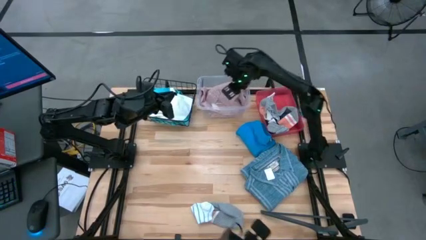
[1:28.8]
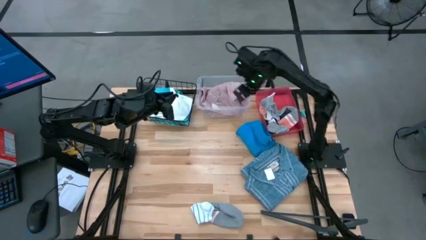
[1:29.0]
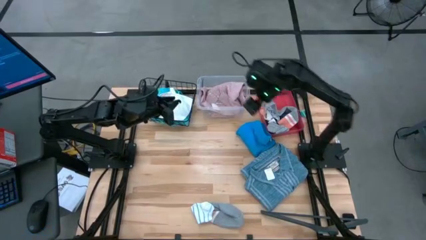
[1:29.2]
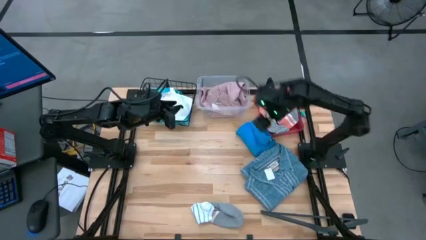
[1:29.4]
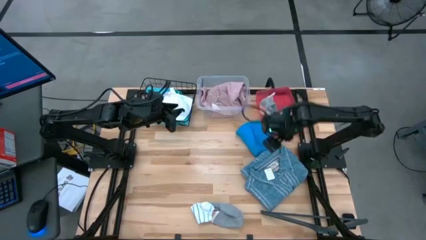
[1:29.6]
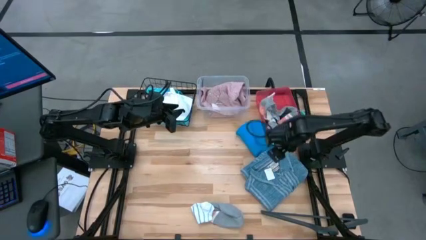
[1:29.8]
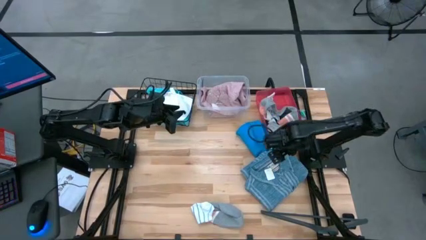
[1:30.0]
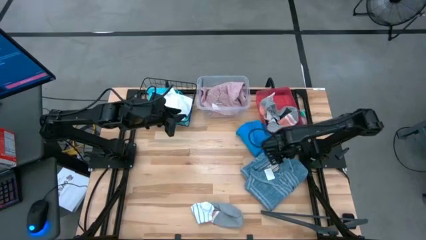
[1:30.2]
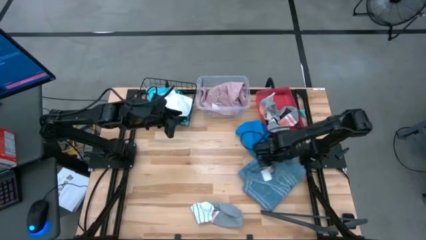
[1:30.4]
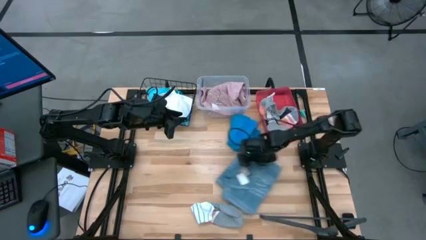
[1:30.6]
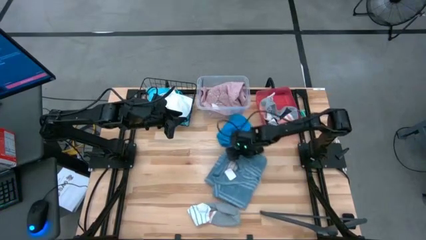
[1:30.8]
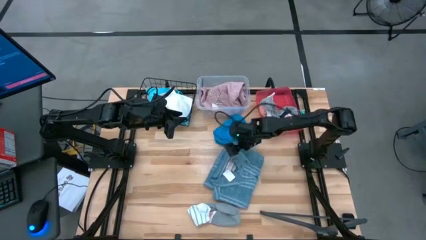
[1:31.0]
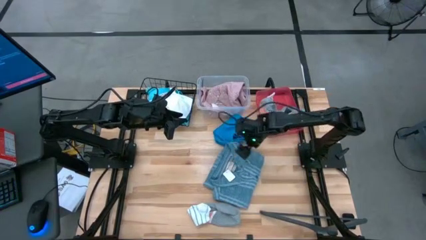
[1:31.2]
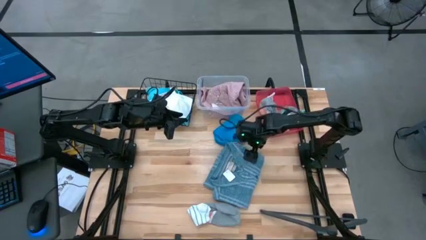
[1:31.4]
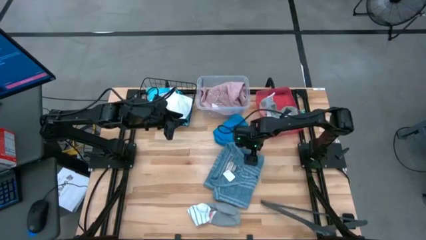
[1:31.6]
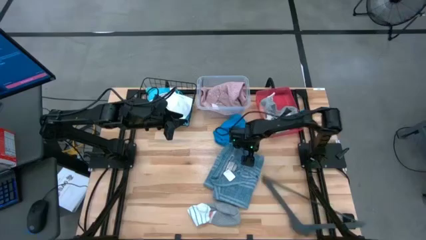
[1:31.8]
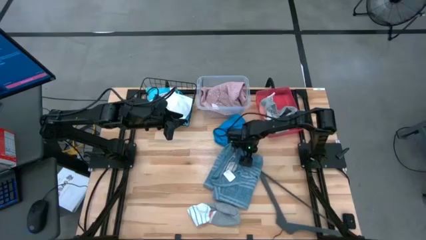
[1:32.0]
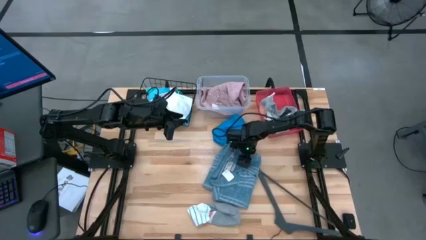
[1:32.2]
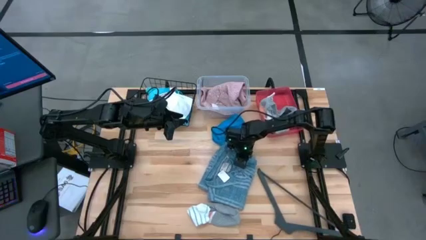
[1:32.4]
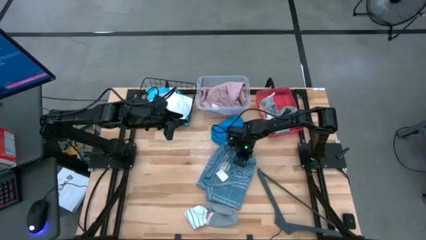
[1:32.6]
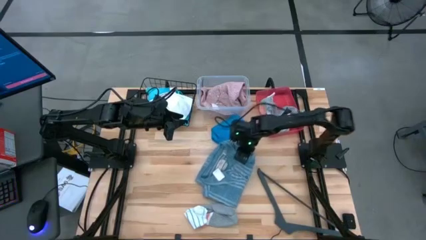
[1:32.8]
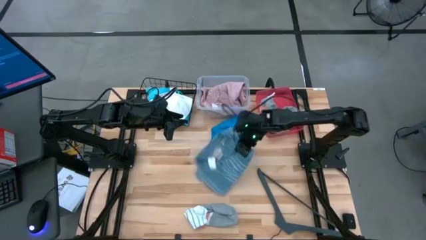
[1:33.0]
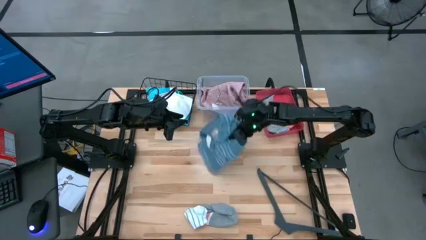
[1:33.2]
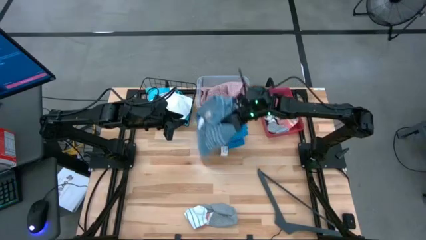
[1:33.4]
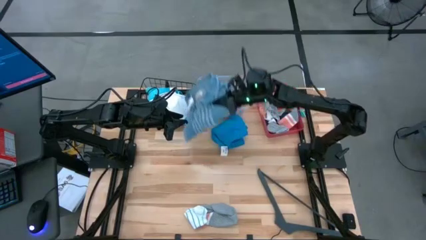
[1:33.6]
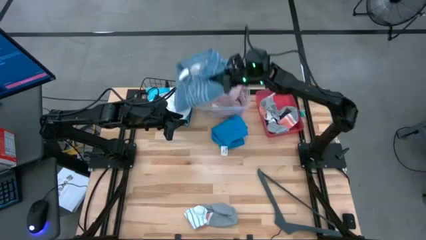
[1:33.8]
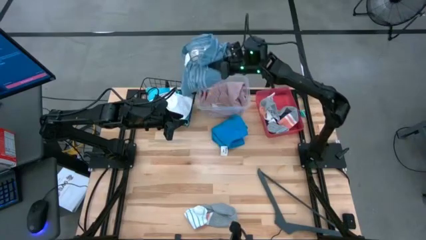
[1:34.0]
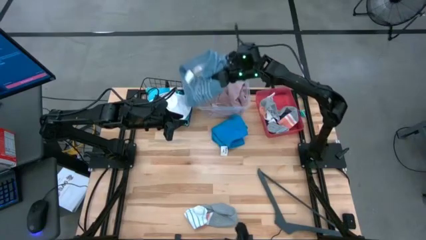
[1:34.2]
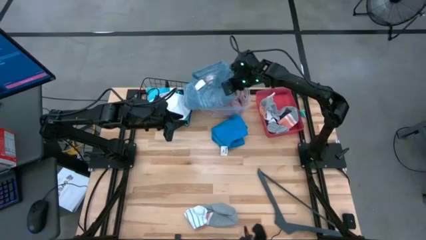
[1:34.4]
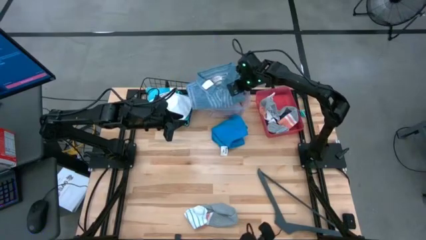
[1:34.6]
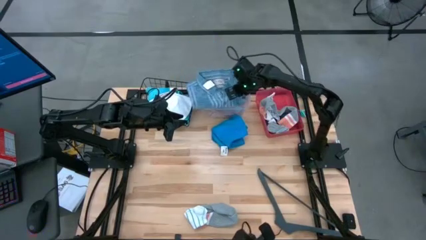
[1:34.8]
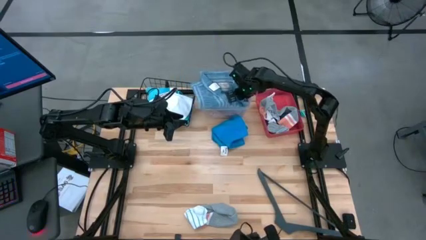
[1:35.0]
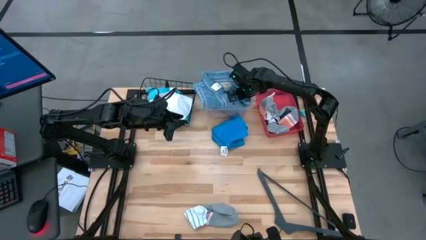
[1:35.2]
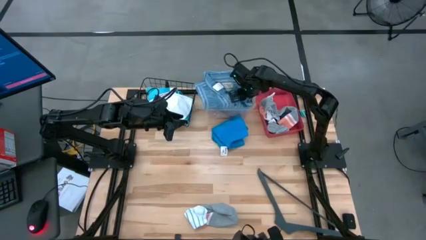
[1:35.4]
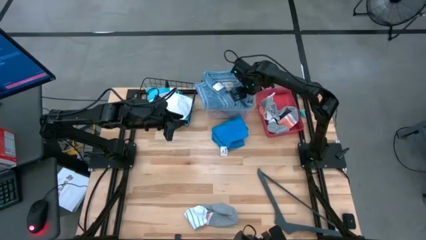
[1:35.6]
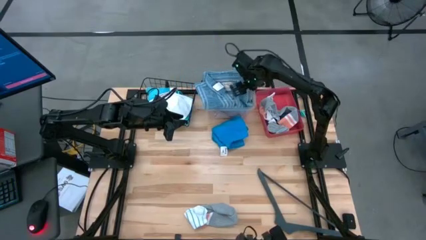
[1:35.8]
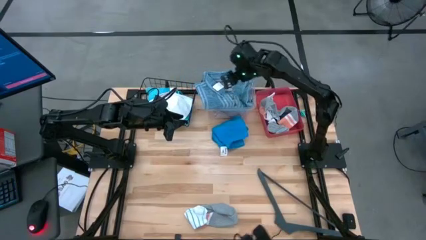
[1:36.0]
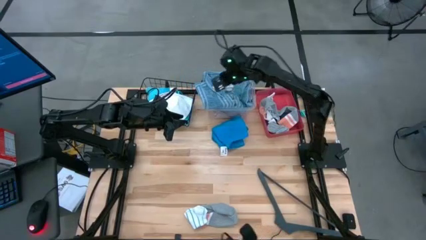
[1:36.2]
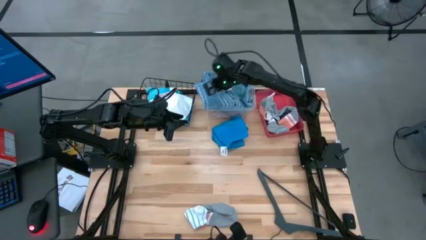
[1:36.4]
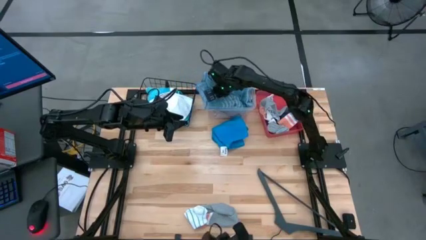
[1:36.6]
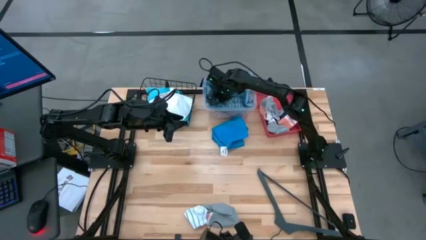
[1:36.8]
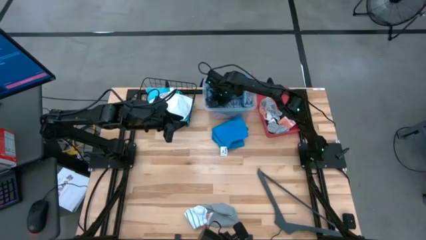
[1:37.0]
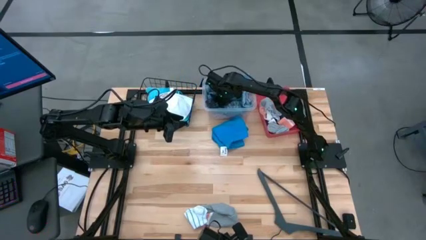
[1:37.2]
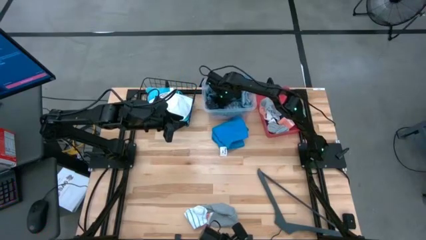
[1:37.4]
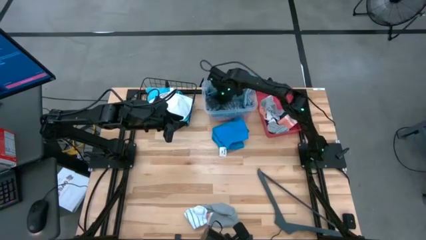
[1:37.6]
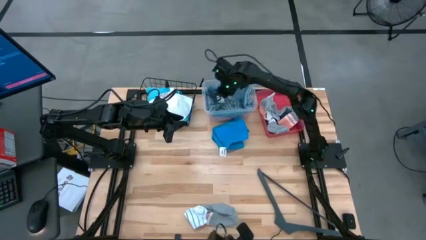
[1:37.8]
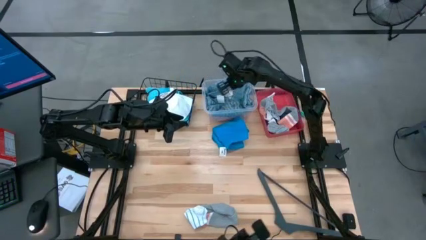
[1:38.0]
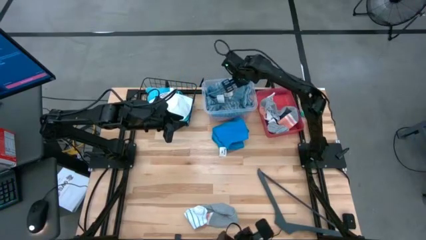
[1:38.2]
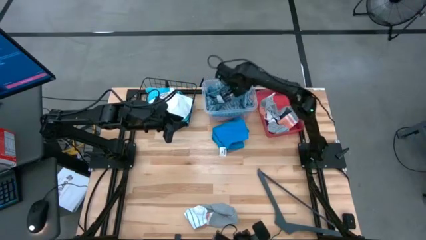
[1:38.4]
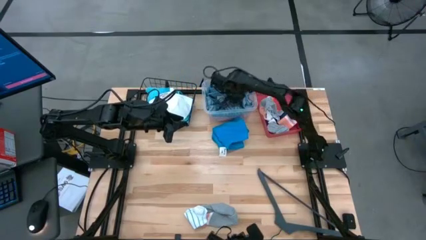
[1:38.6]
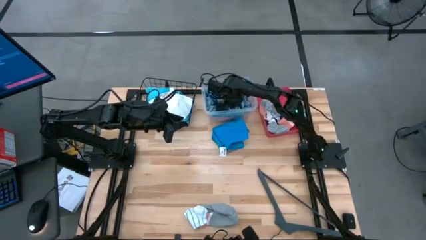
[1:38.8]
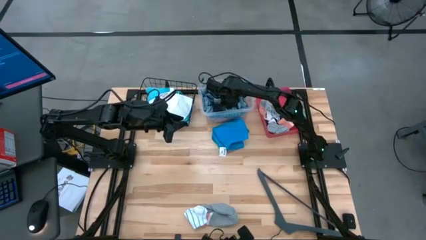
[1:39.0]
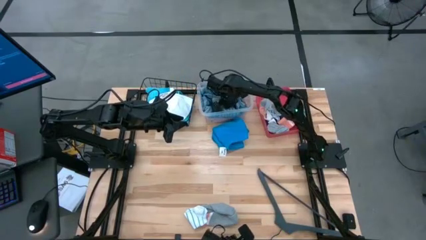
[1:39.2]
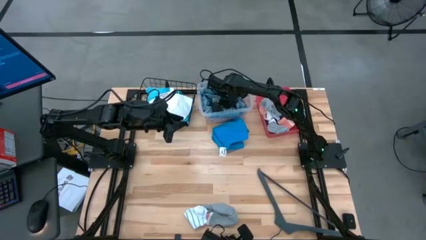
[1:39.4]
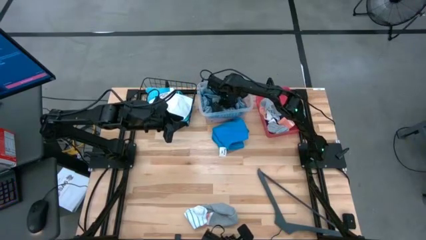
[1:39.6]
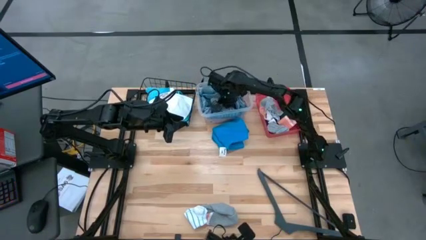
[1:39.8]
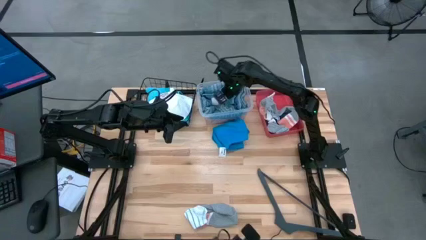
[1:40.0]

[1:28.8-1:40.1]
Task: Pick & Place Cloths
Put the blue polo shirt into the transparent bin

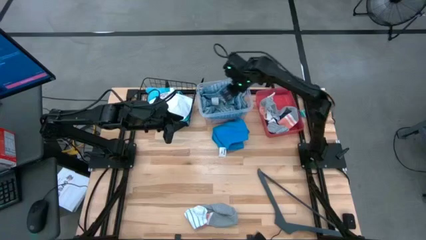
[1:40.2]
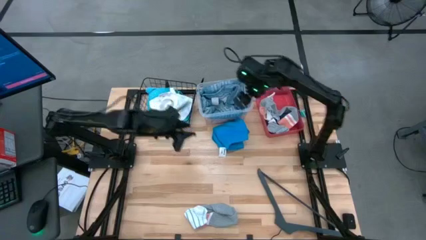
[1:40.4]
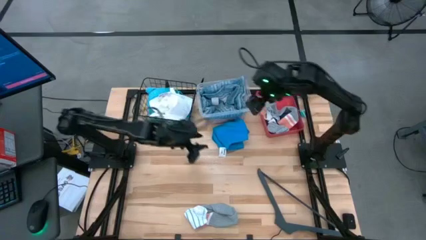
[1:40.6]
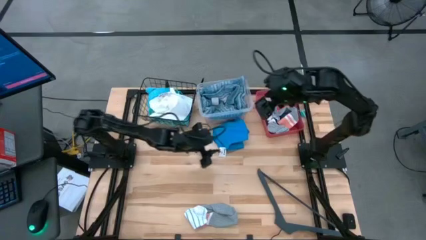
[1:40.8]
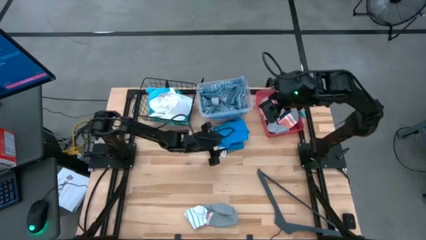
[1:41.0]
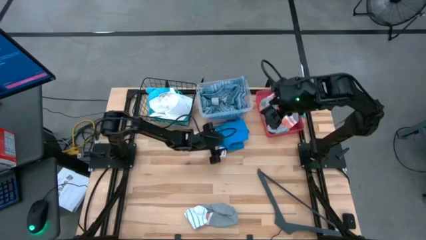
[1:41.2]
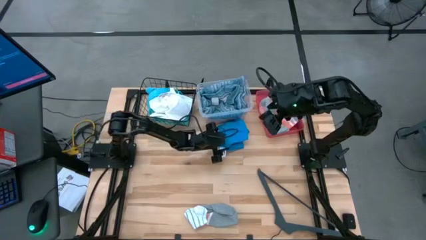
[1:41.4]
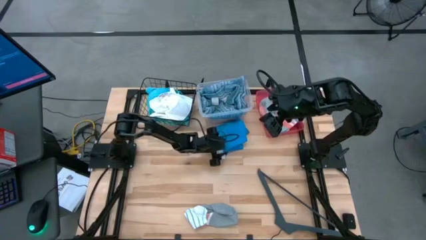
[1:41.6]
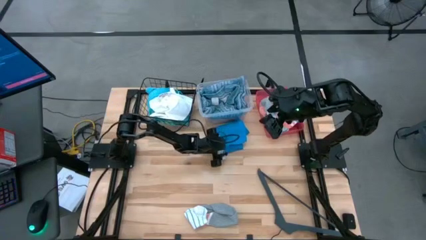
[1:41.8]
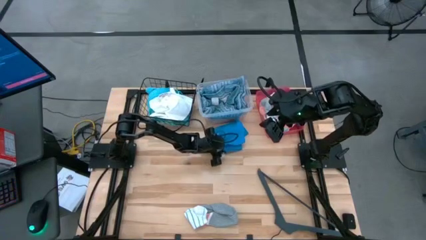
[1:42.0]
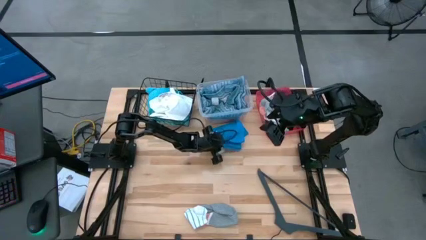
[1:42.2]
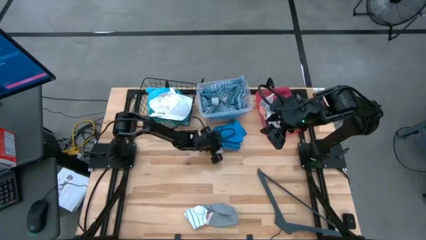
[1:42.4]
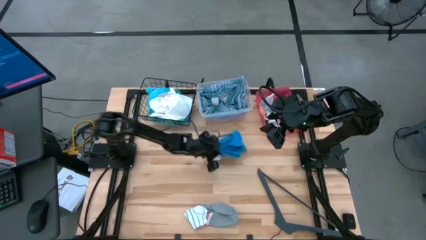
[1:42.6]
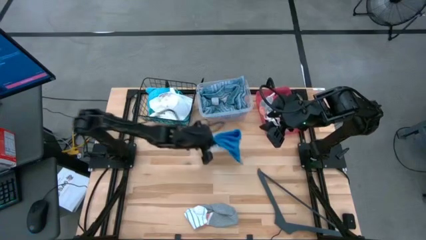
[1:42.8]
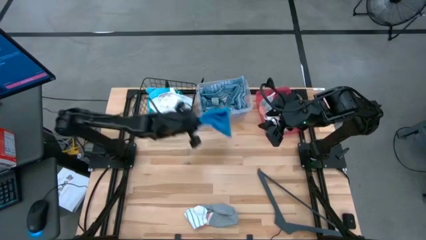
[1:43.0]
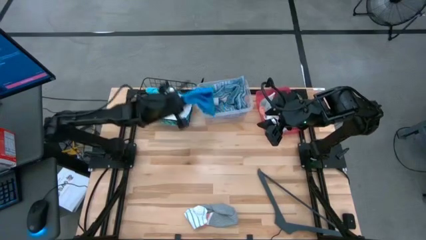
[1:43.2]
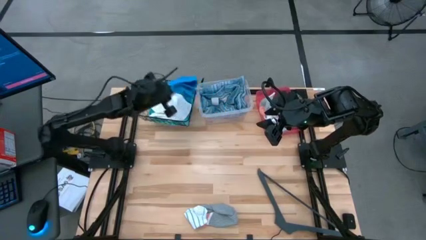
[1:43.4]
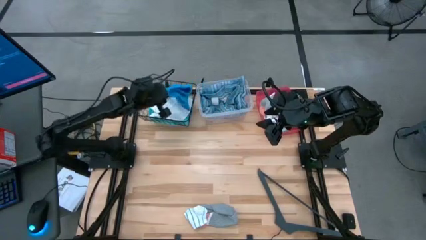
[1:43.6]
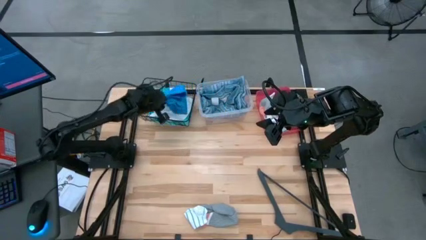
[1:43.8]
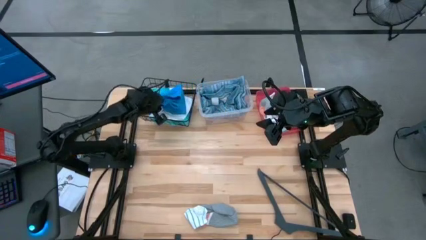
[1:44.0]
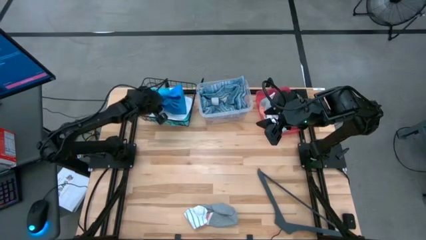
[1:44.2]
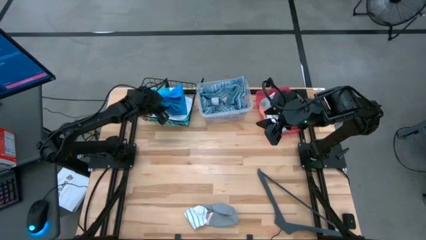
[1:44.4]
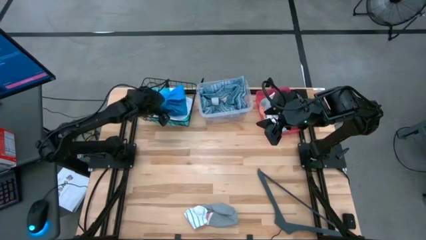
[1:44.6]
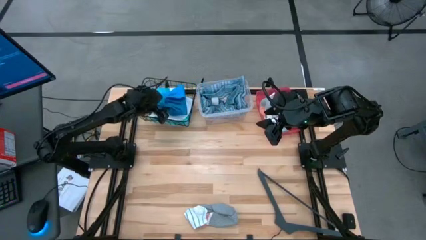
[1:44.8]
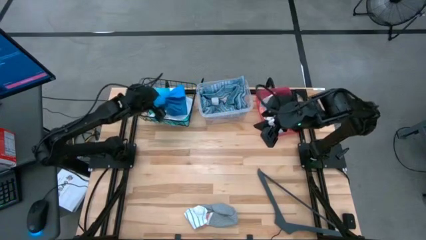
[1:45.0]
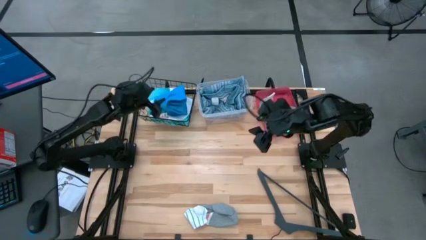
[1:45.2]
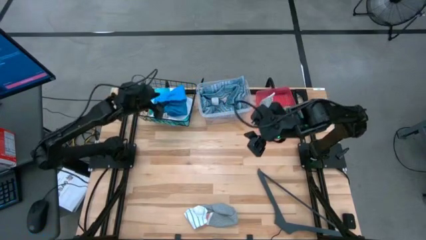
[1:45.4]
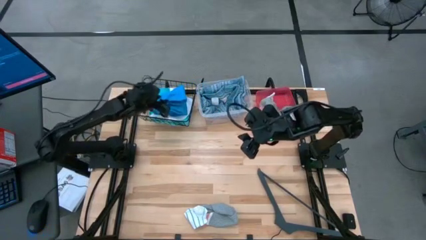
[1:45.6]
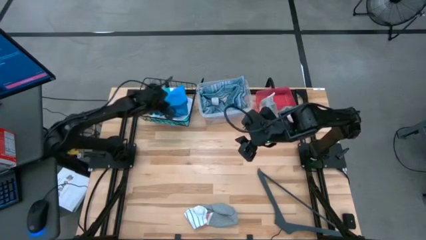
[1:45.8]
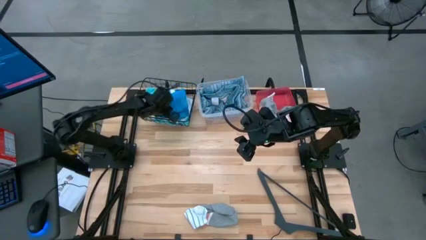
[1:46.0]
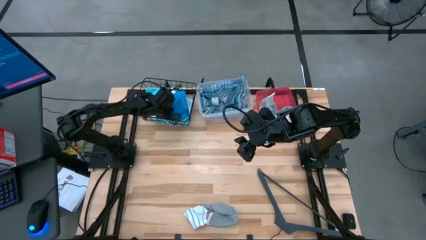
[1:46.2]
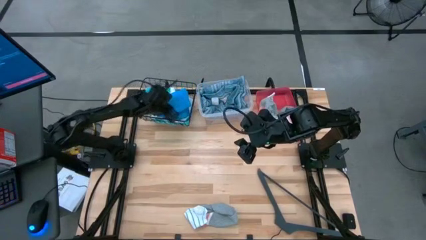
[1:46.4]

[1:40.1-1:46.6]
Put the blue shorts into the black wire basket
